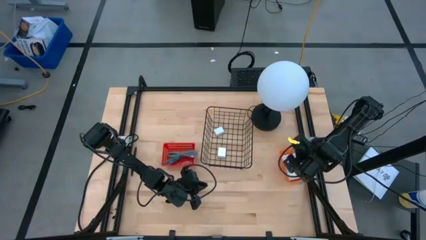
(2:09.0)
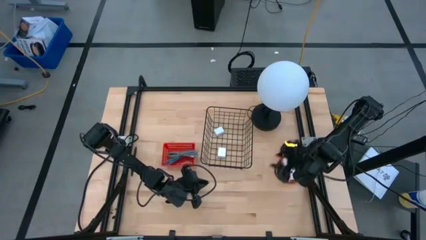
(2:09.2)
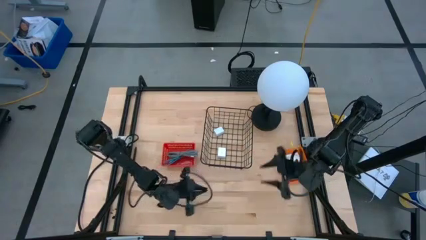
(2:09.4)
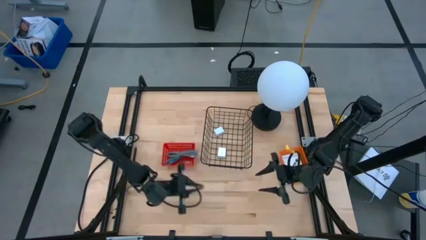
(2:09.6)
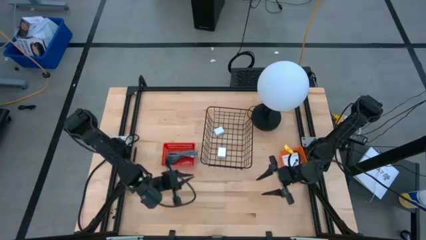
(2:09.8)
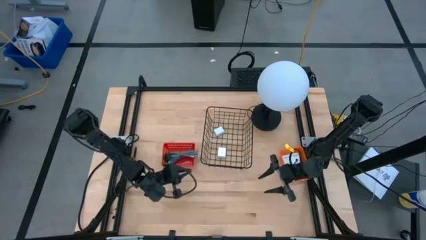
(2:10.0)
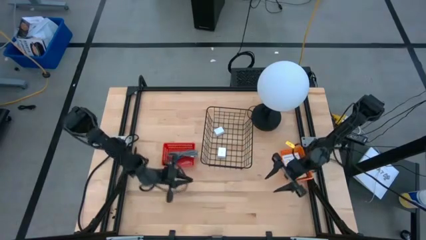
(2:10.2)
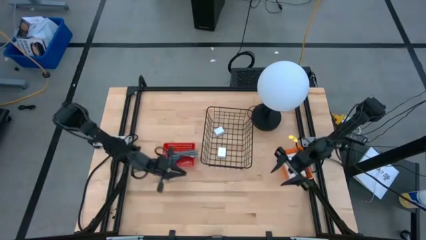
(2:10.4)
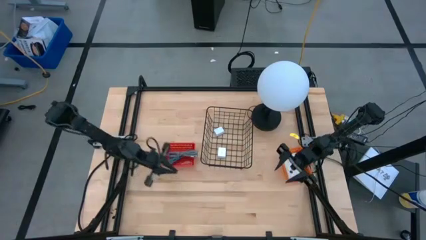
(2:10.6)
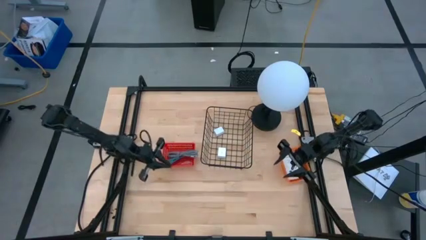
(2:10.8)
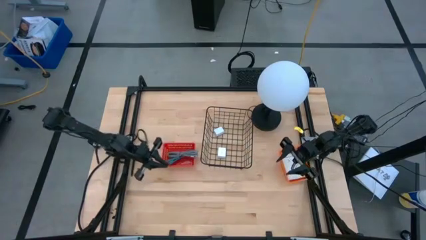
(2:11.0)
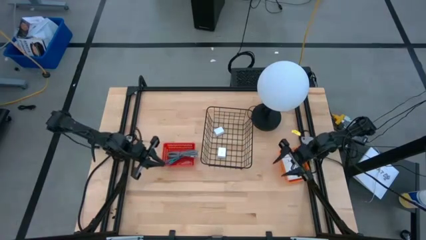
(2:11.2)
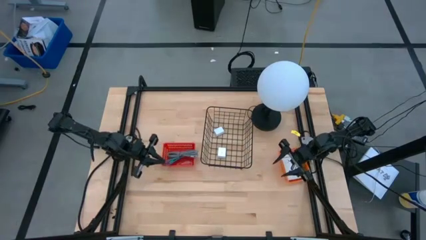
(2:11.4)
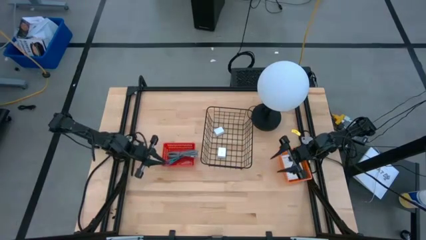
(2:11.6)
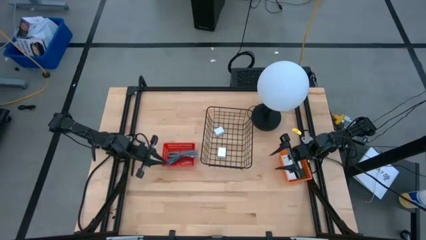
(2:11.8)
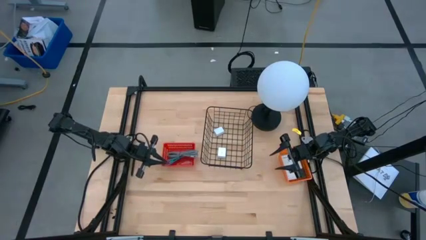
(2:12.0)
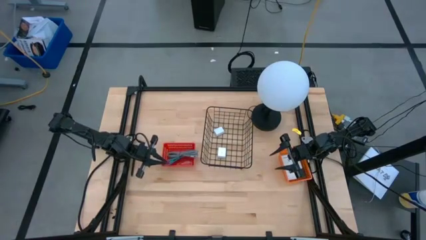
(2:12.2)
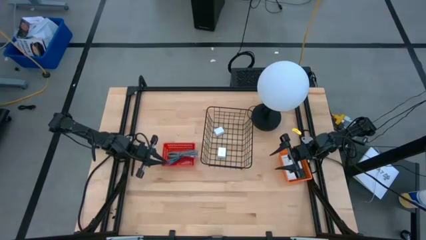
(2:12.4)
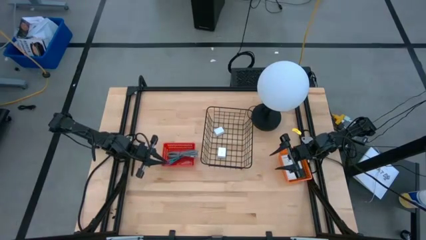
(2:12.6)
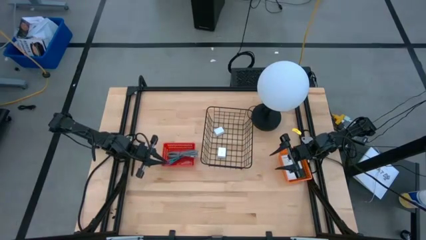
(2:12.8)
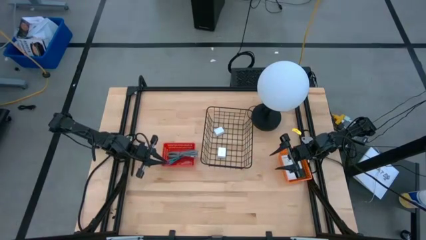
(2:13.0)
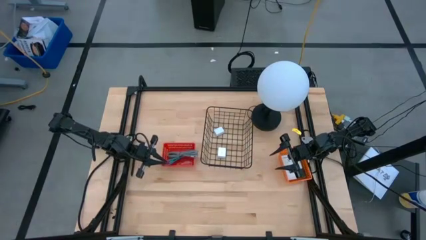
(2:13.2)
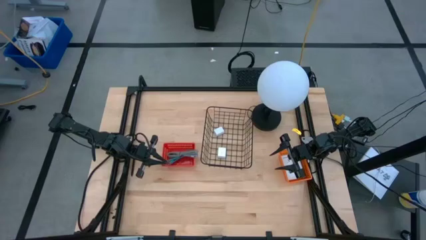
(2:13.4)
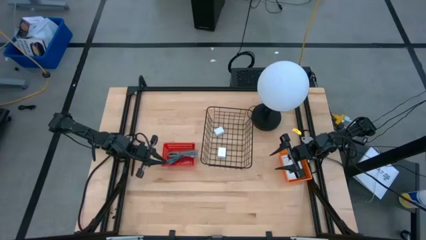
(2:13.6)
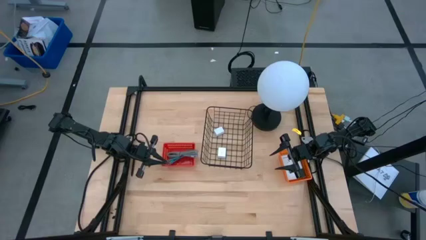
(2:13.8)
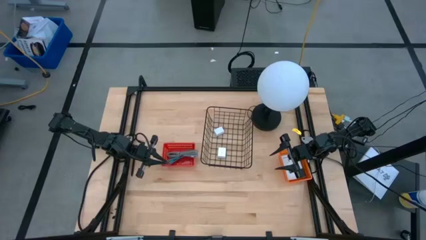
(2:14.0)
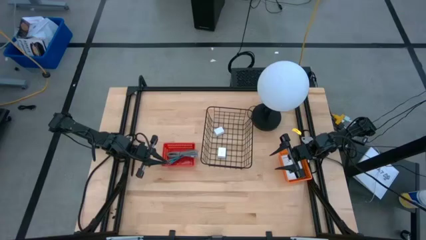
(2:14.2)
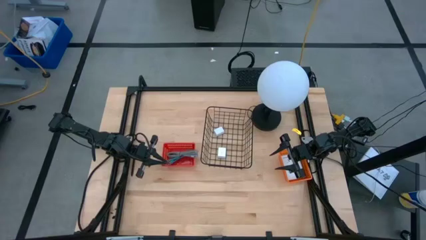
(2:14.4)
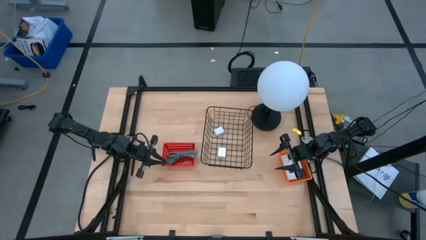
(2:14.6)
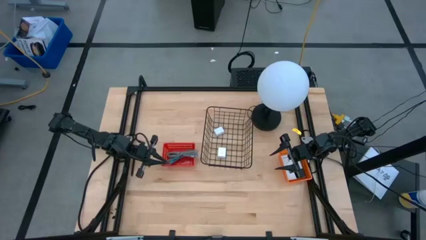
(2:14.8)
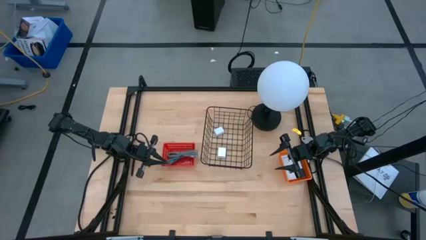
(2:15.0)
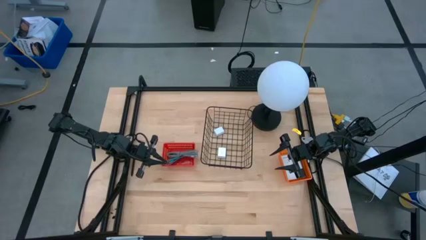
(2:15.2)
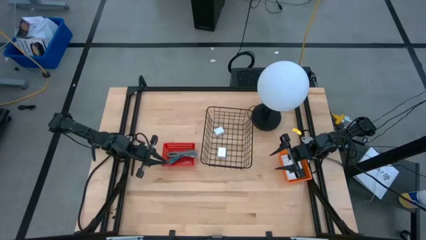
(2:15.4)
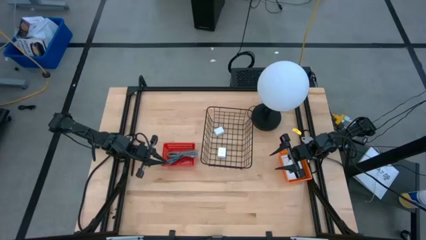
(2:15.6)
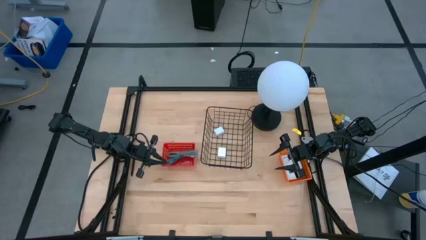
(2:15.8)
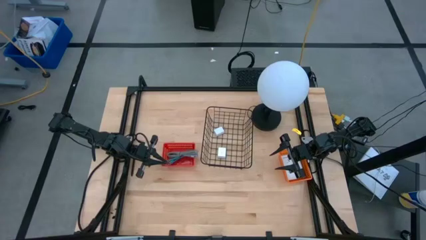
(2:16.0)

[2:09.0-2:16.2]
Task: Pick and place items into bin
Return to Home Position

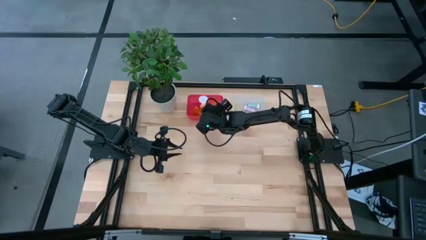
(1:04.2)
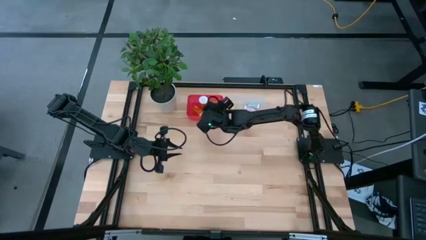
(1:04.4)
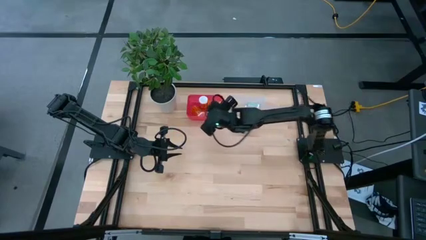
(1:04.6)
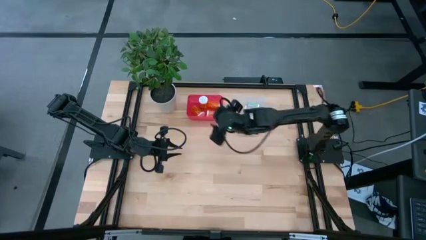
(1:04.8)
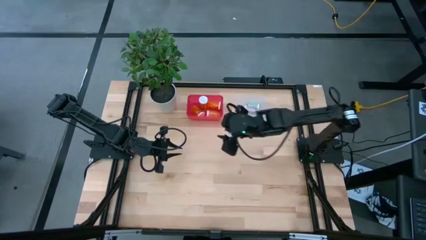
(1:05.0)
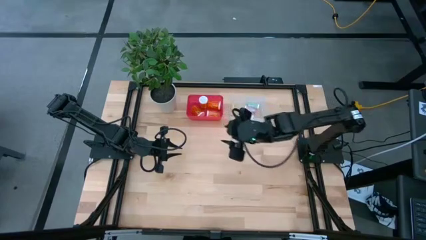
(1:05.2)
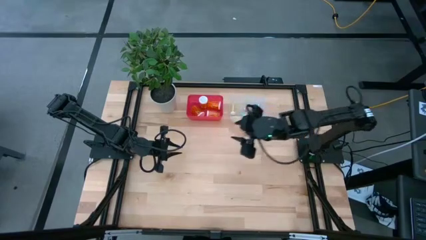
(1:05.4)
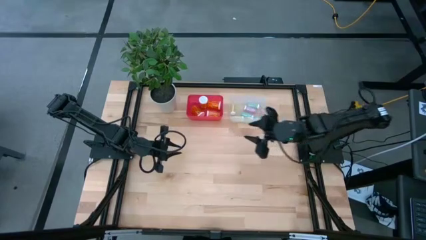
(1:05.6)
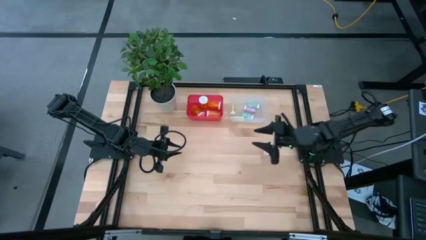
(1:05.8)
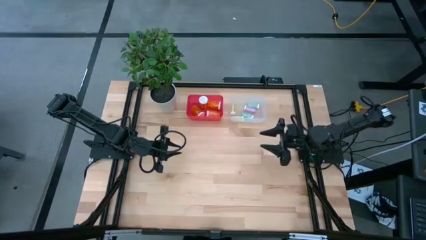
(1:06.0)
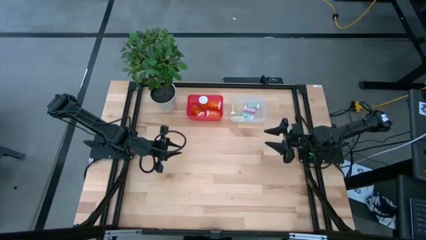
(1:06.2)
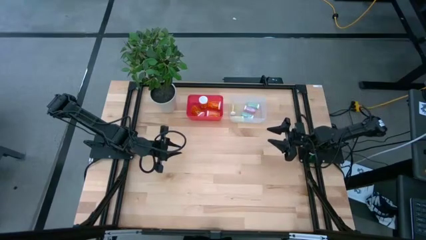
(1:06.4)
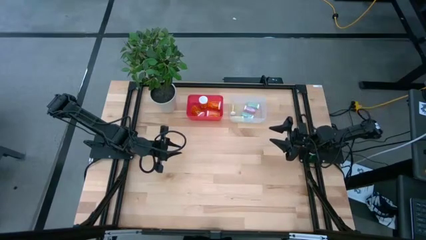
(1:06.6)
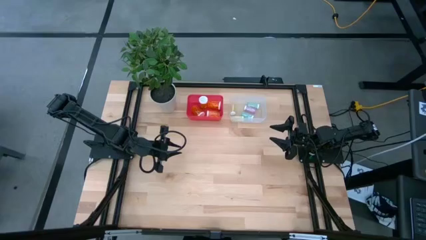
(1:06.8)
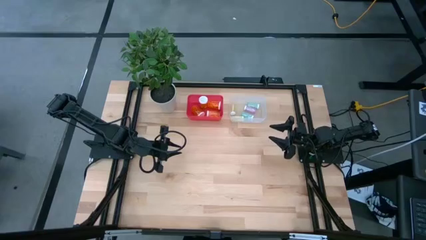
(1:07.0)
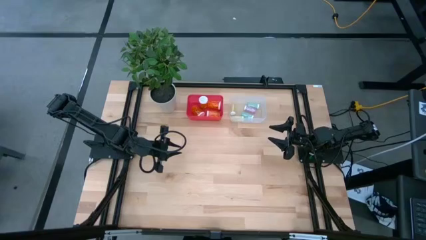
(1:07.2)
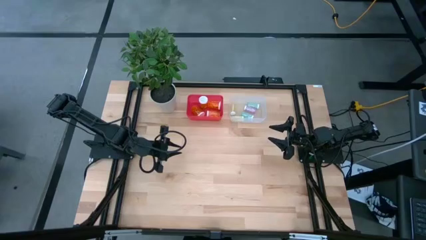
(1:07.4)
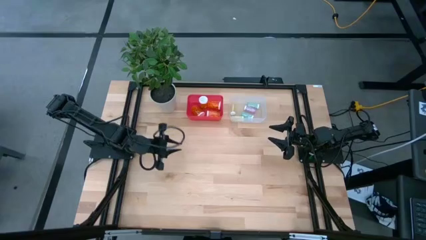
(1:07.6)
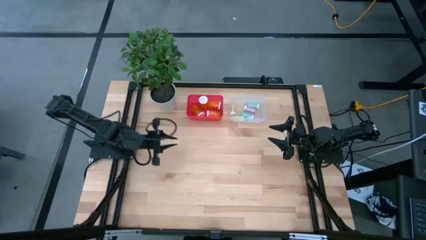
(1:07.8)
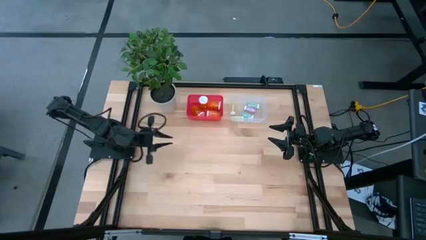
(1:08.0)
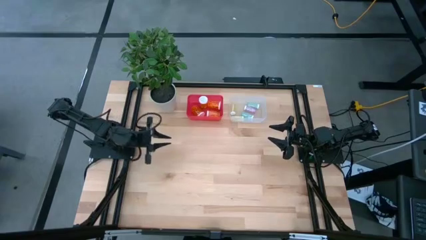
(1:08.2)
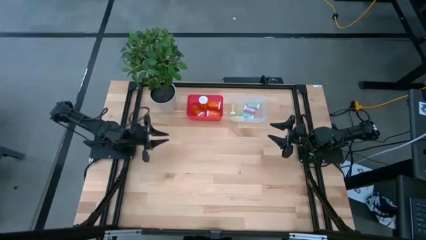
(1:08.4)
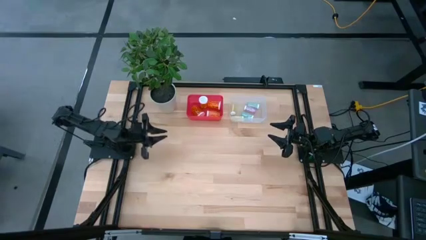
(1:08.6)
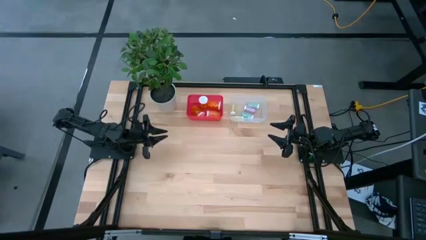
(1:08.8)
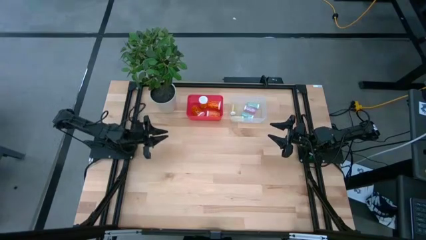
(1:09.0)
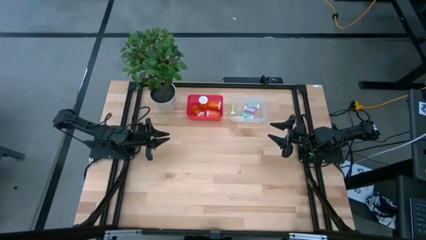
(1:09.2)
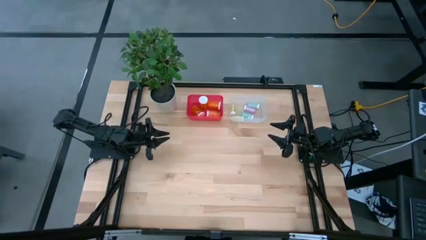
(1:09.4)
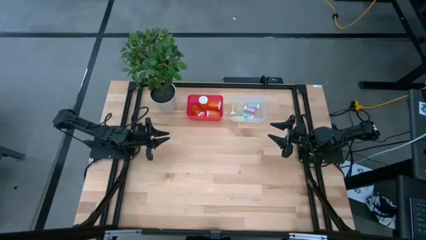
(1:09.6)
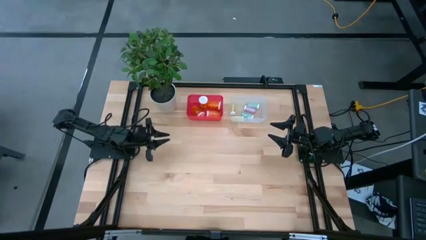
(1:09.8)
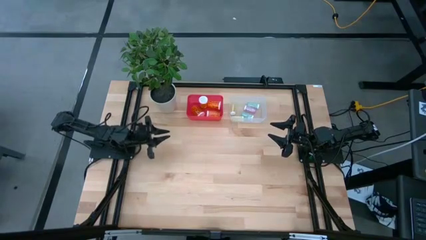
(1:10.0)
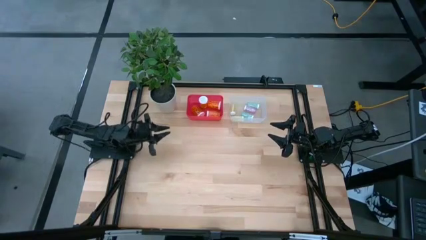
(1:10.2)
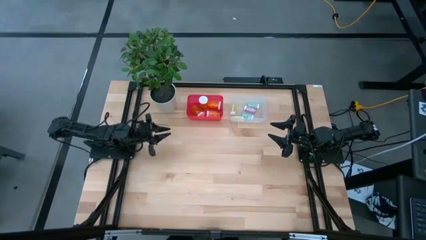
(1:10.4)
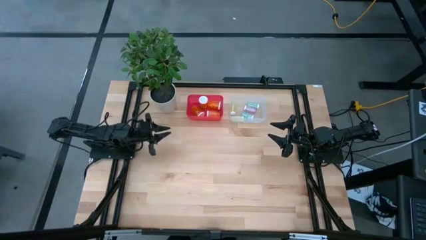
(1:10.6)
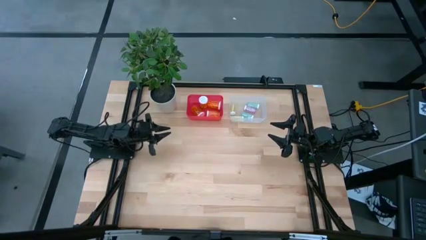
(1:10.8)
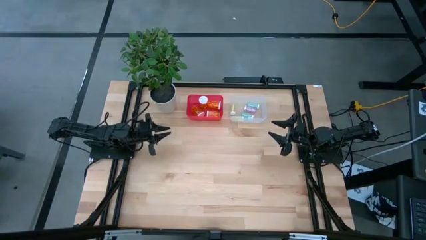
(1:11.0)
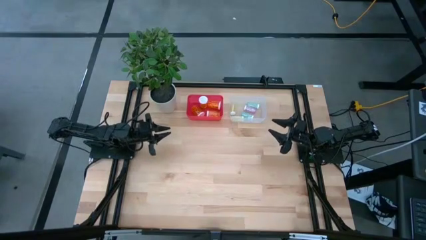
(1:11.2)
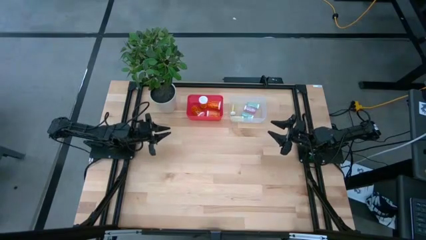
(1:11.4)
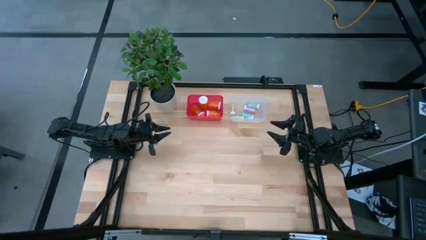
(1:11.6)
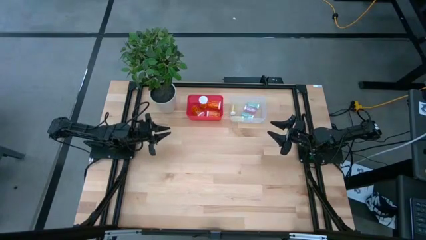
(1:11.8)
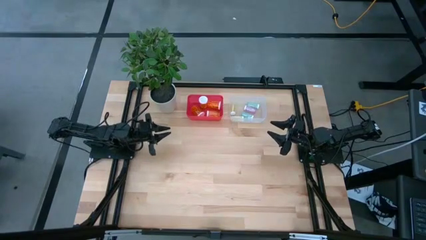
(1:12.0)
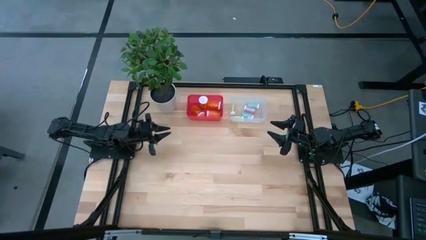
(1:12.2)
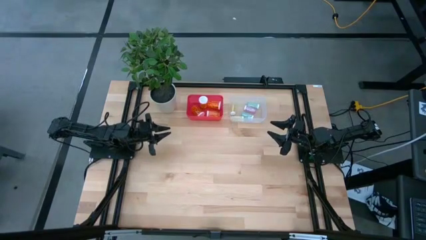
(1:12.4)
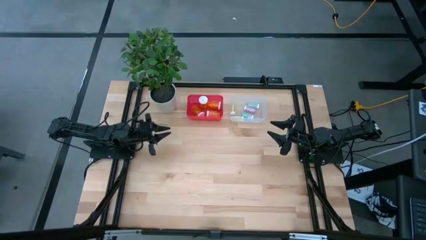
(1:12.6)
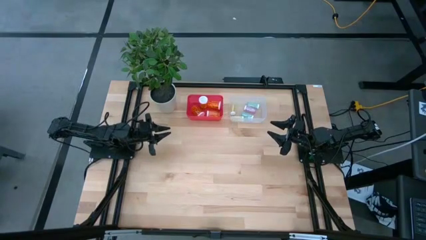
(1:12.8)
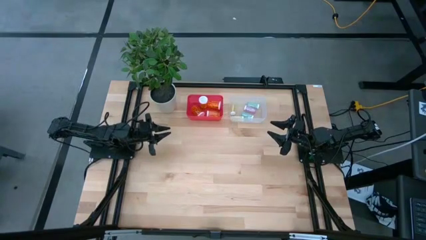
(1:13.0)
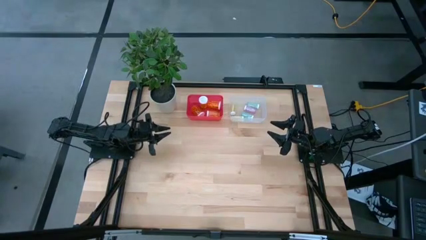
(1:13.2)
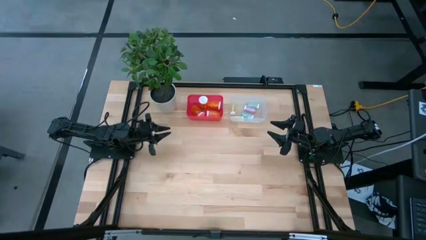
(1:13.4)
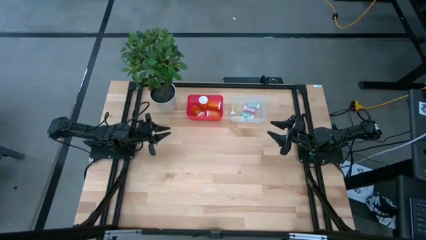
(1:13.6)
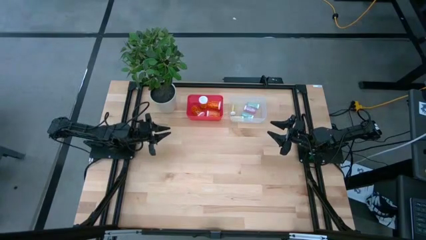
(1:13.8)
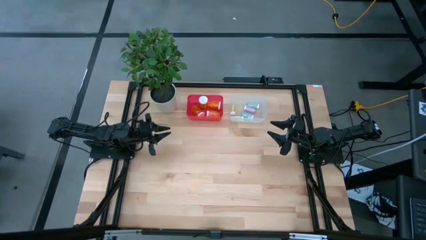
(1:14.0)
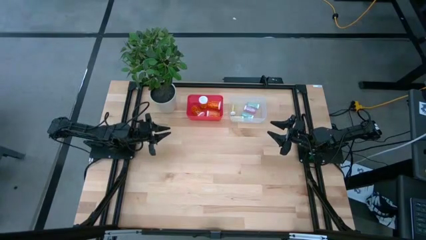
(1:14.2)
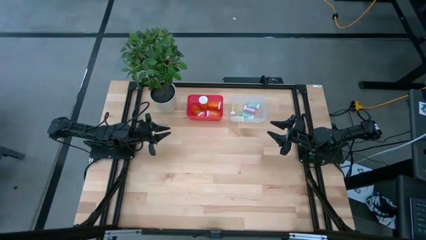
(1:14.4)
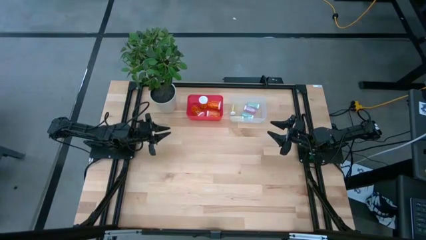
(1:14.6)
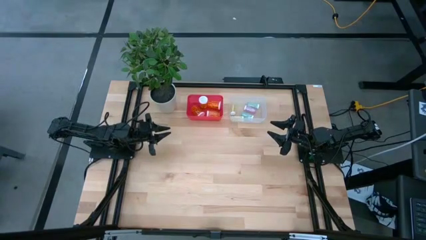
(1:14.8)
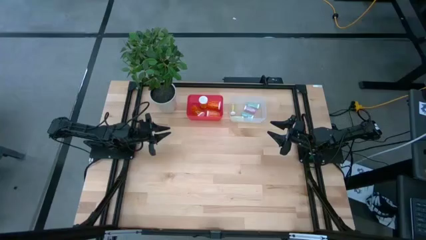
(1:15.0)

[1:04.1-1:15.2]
Task: Pick and place medicine bottles into bin by pill shape (circle, oval)
Return to Home Position
